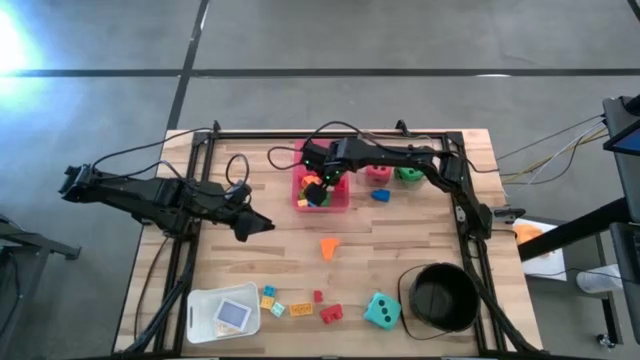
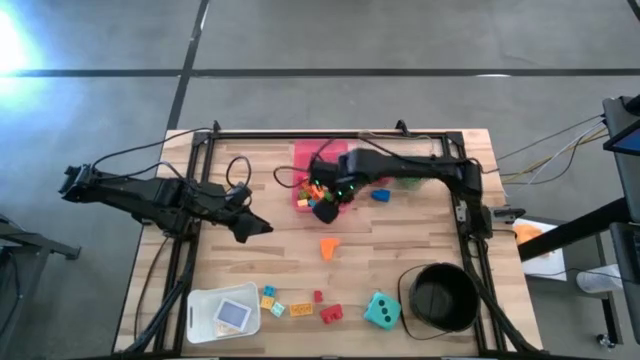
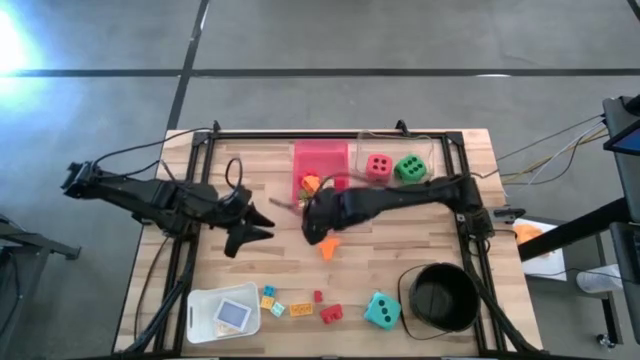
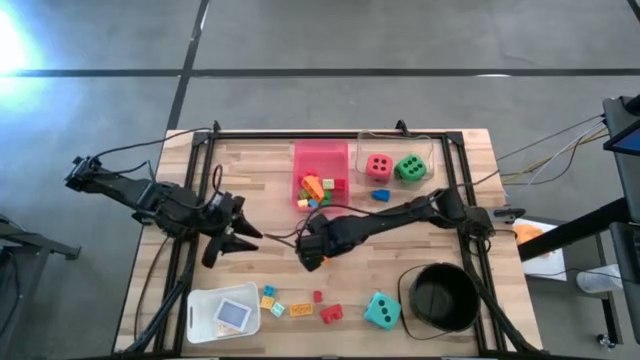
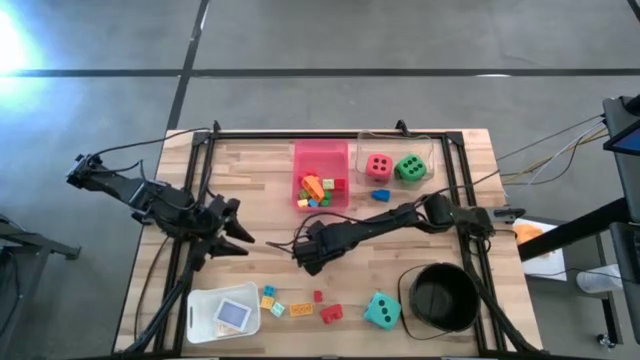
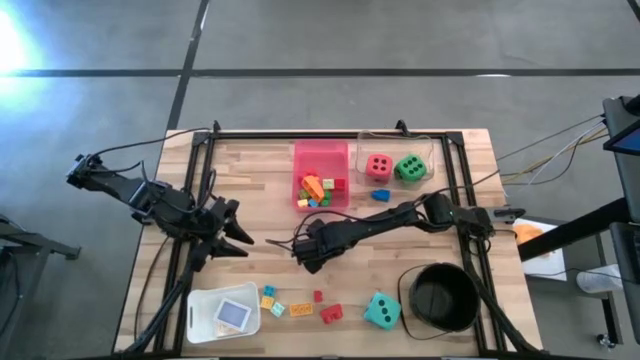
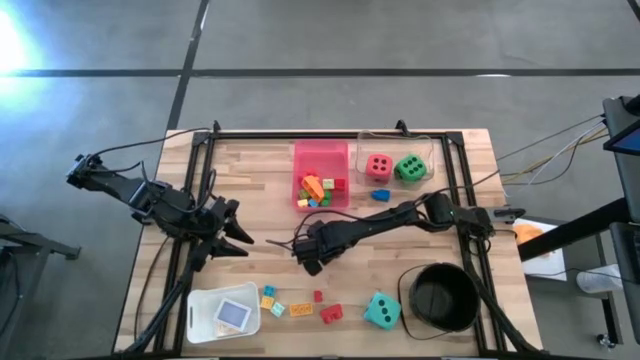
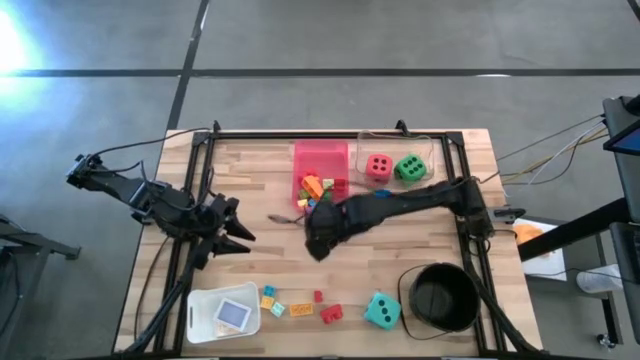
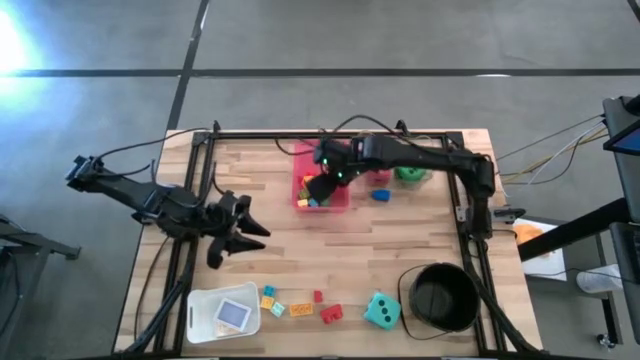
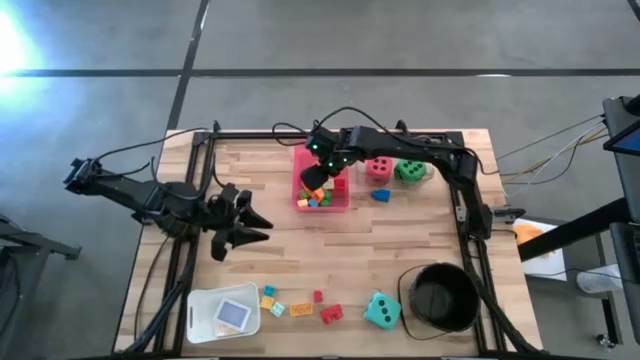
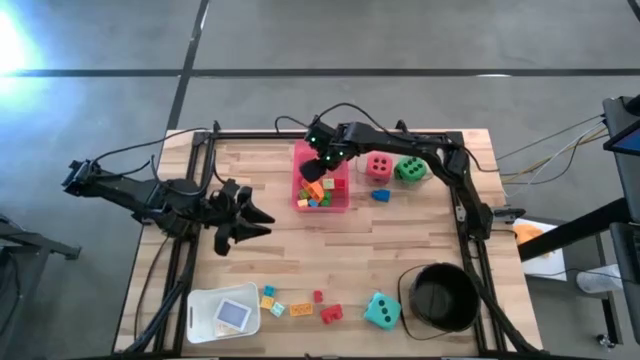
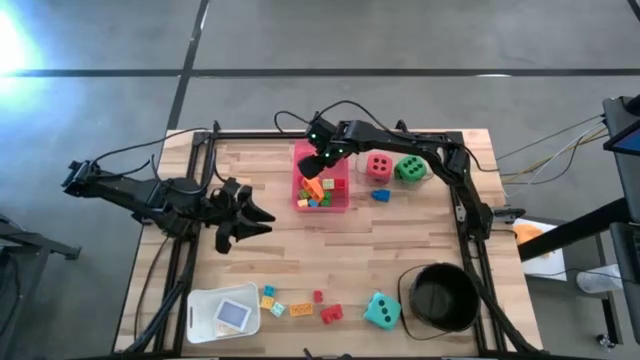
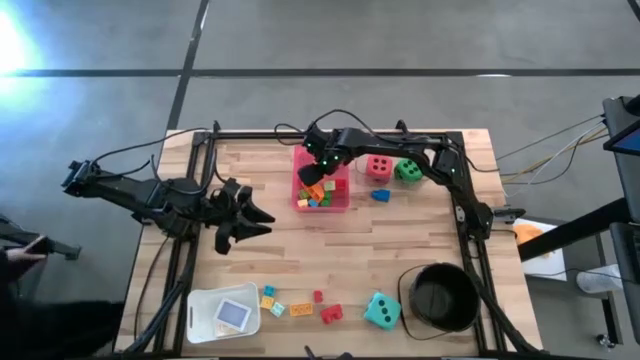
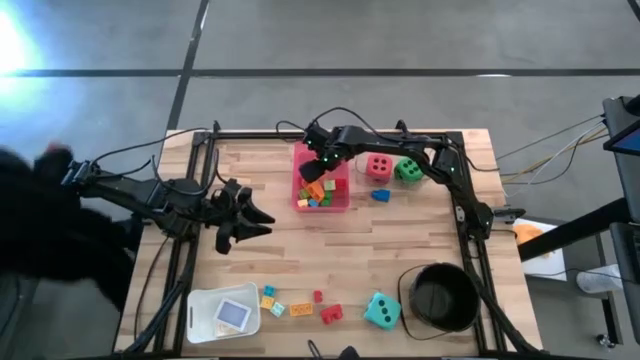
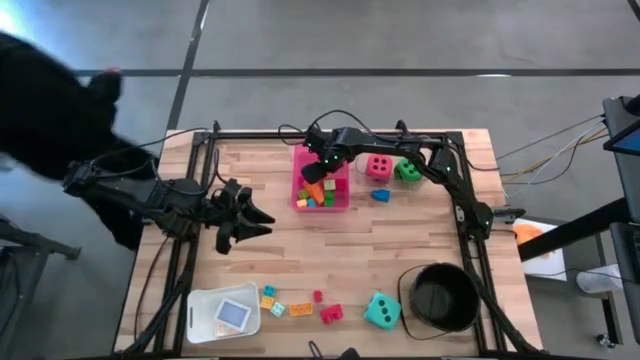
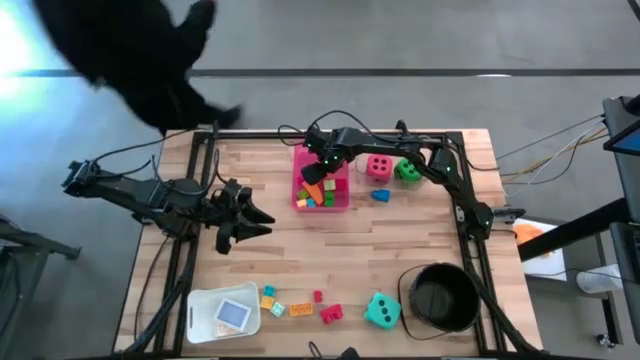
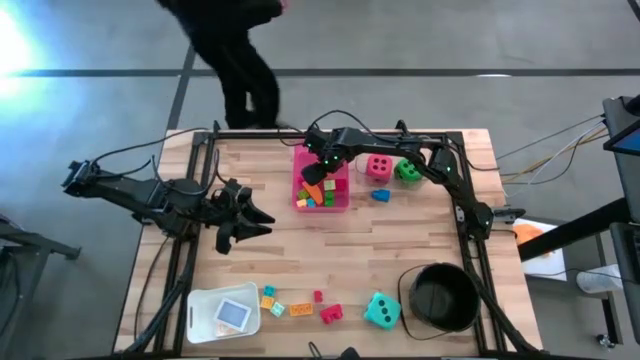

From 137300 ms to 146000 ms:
Task: Pick & Place Toys
Put the orange game piece into the red bin

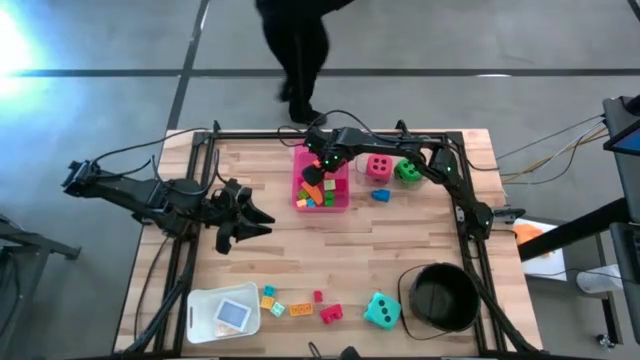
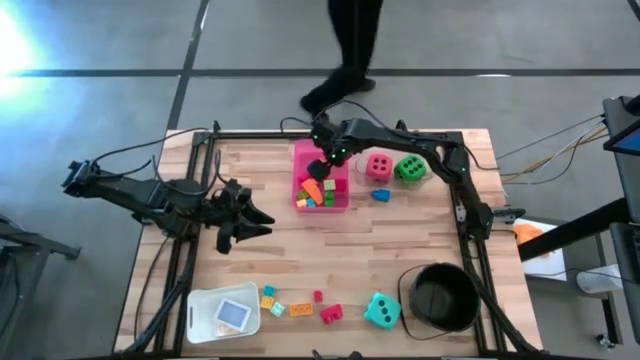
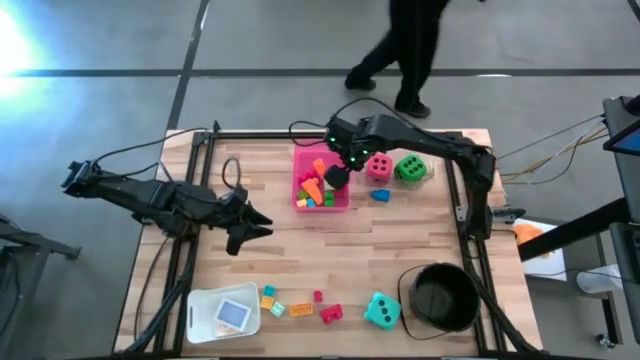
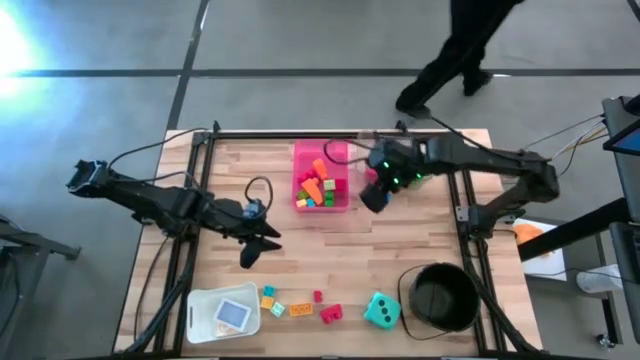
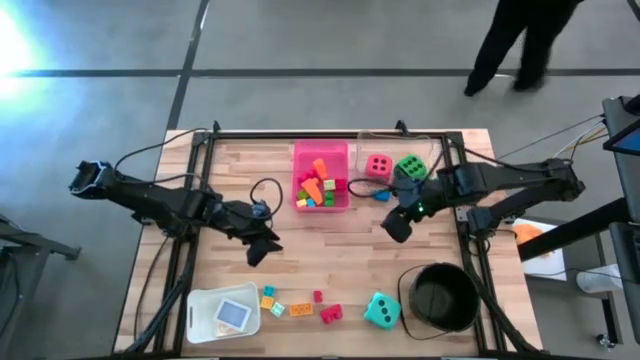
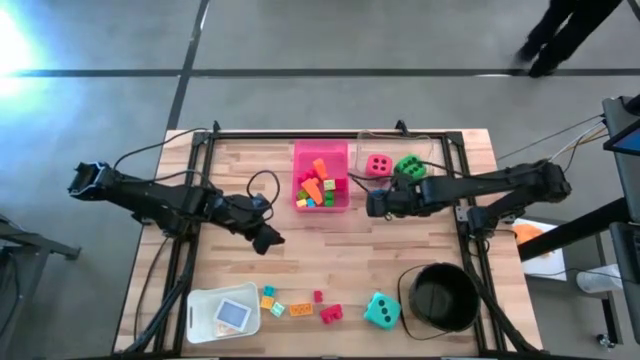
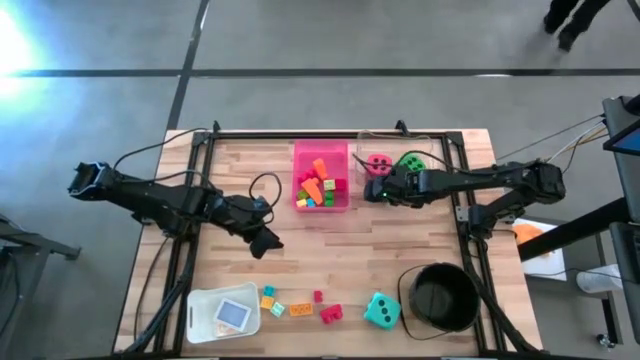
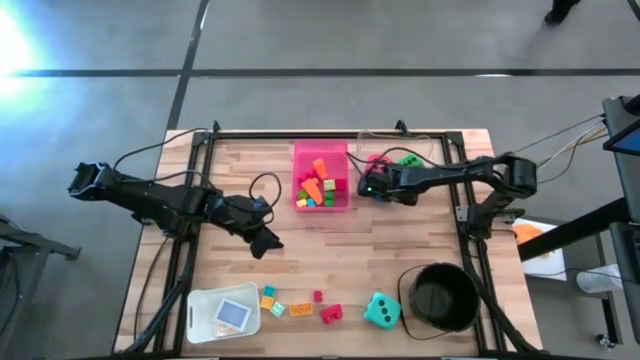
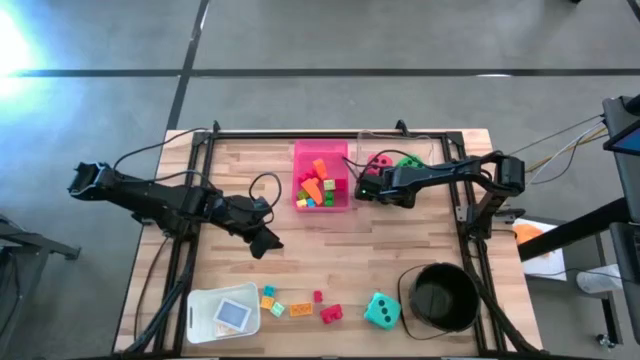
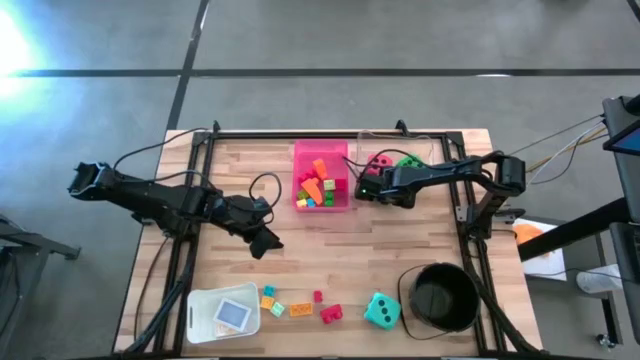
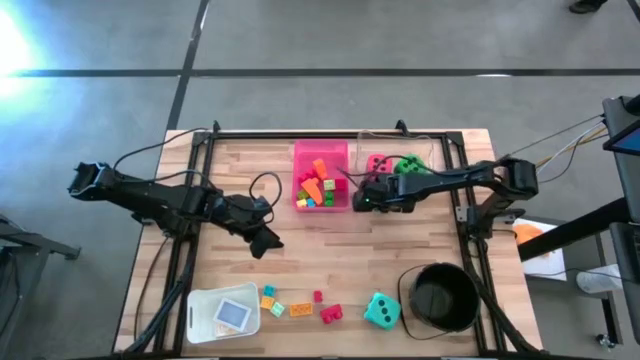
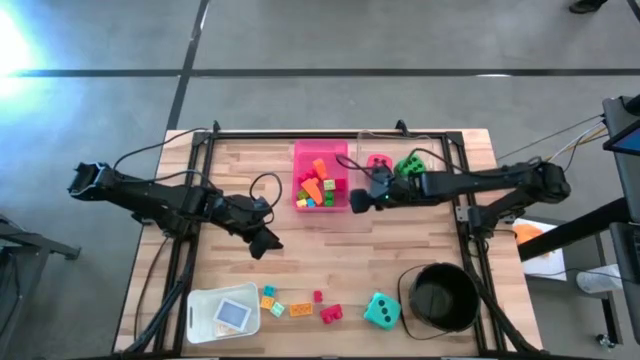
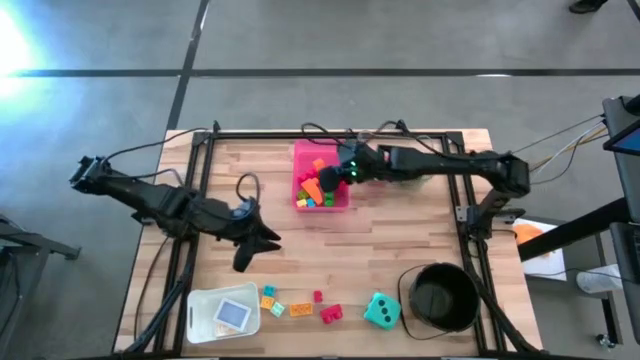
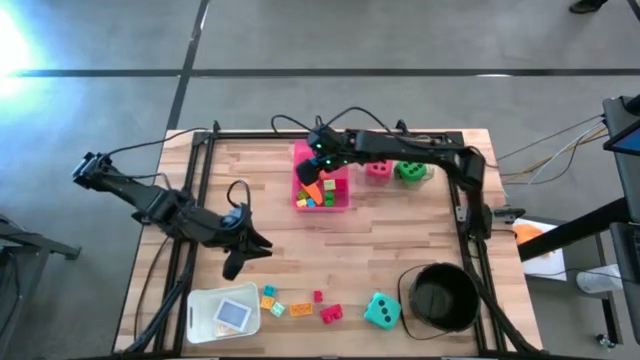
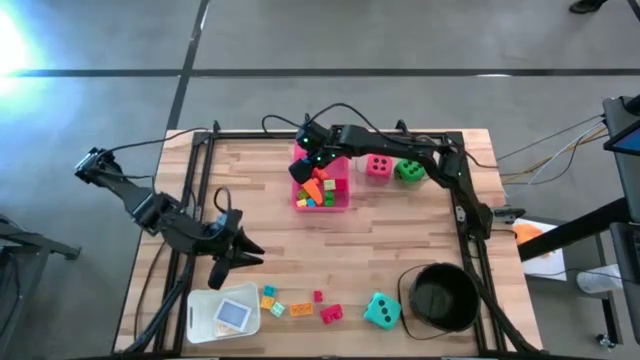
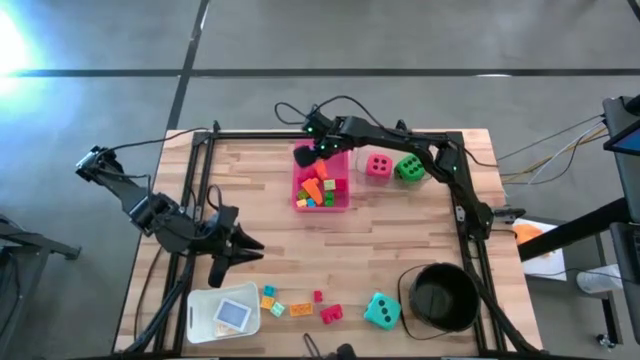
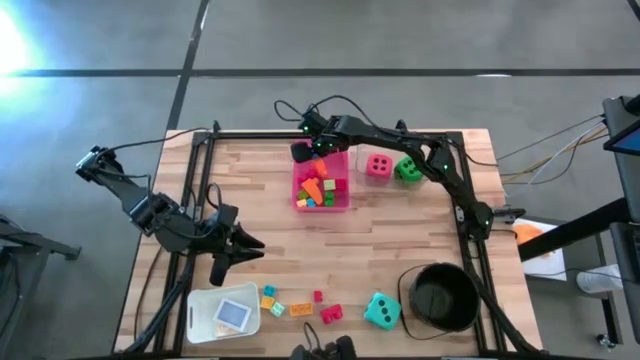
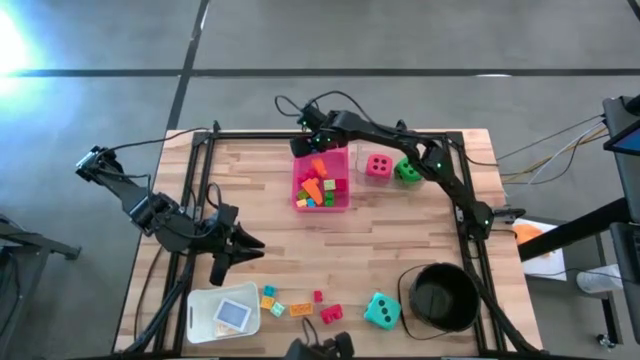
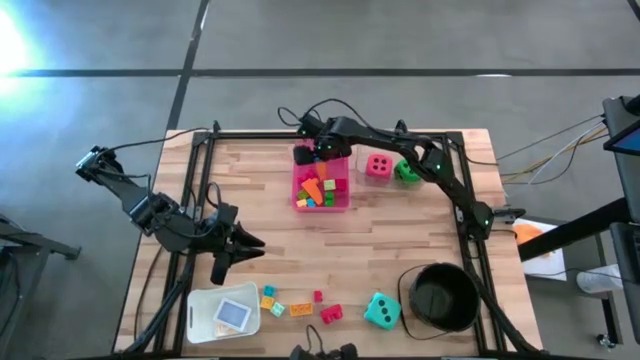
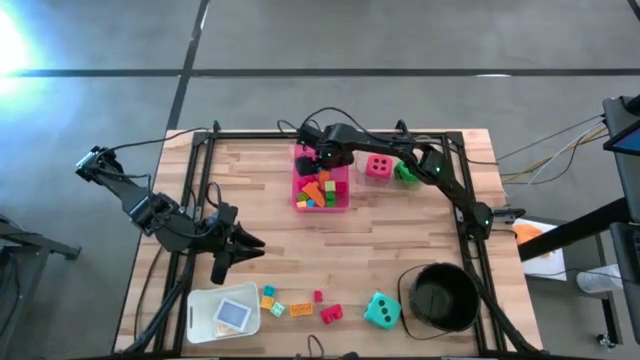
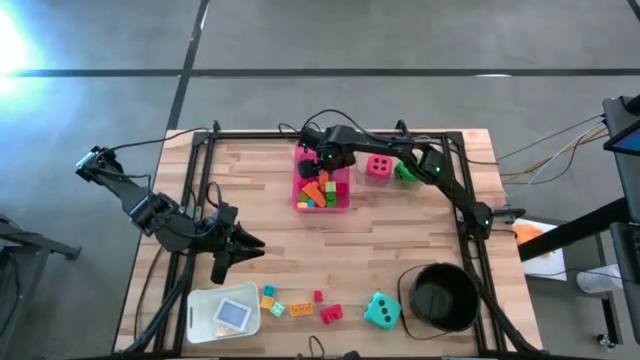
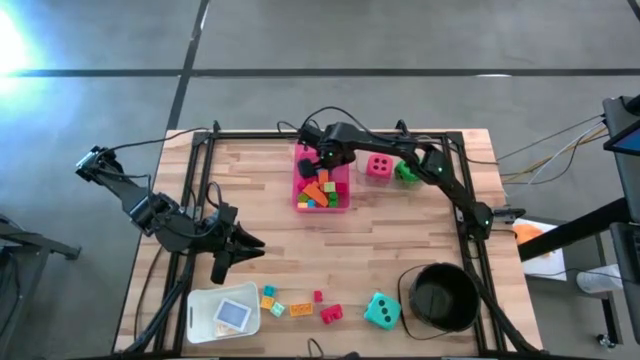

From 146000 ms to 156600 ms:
Put the dark blue game piece into the red bin

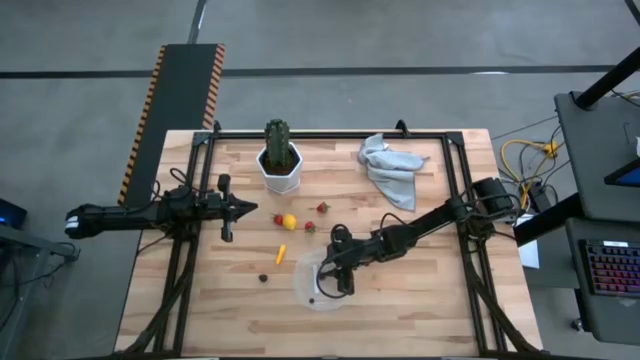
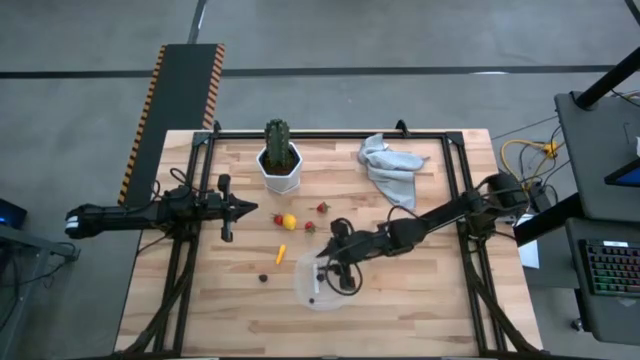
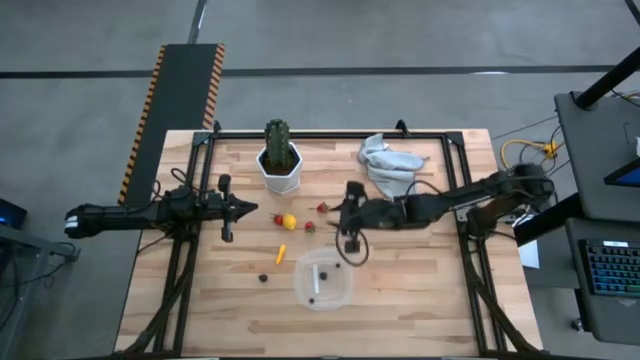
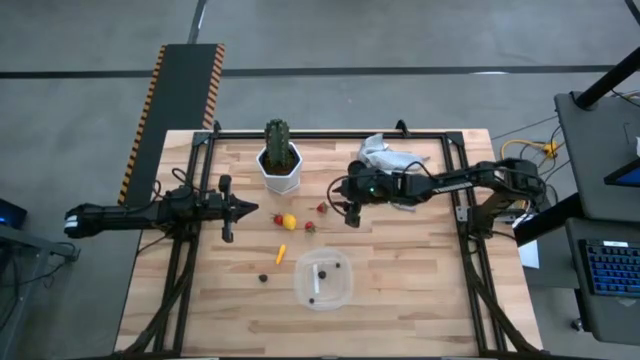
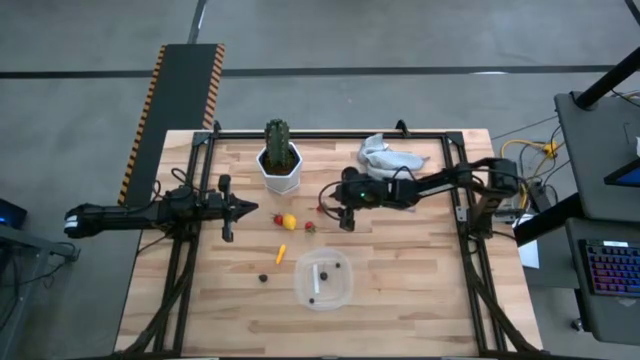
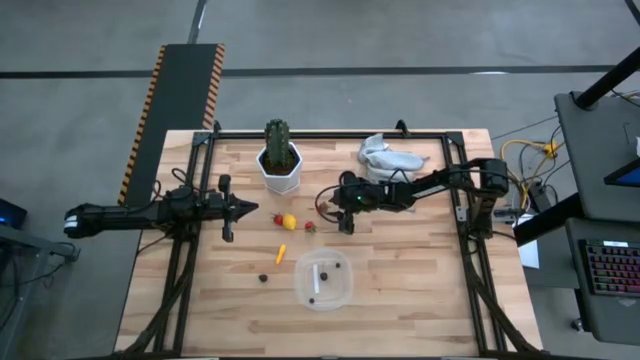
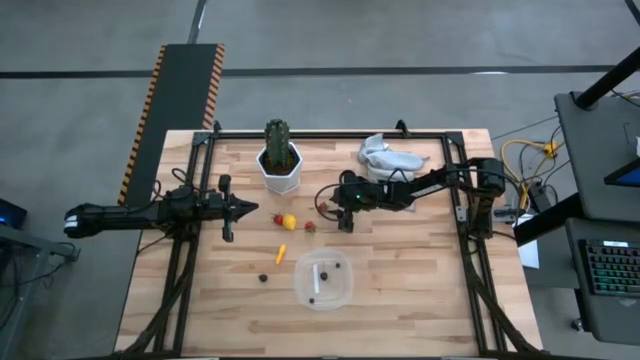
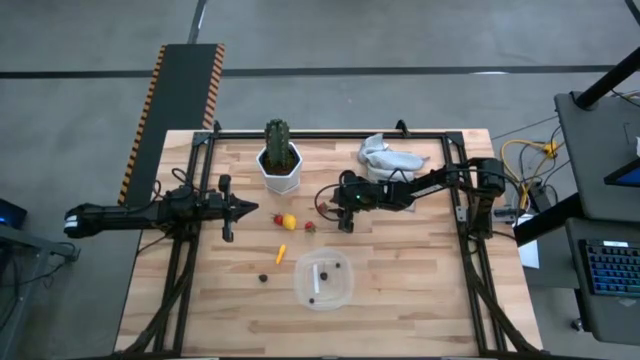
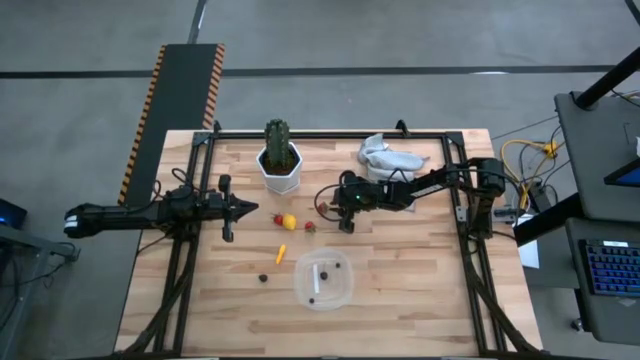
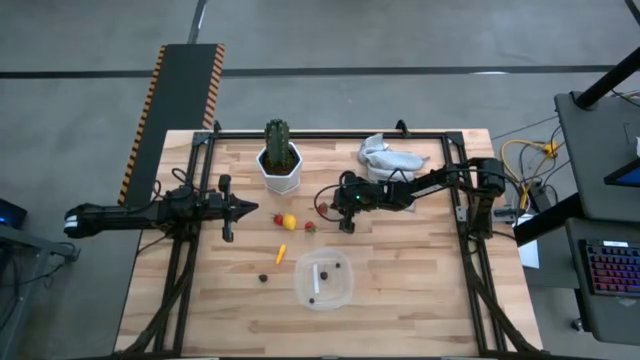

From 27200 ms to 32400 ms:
Task: Pick and placing Produce into tupperware
Put the top right red strawberry into the transparent container
